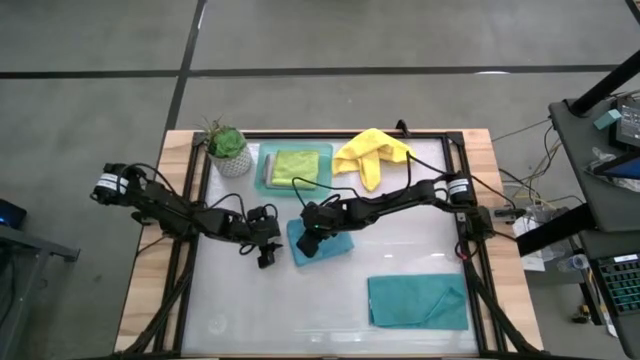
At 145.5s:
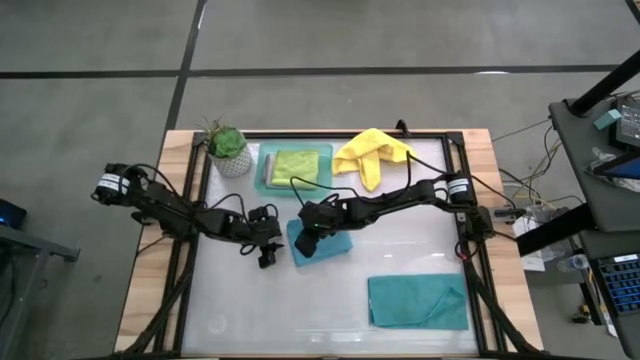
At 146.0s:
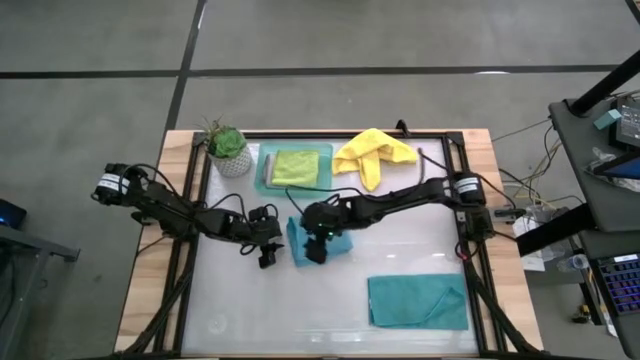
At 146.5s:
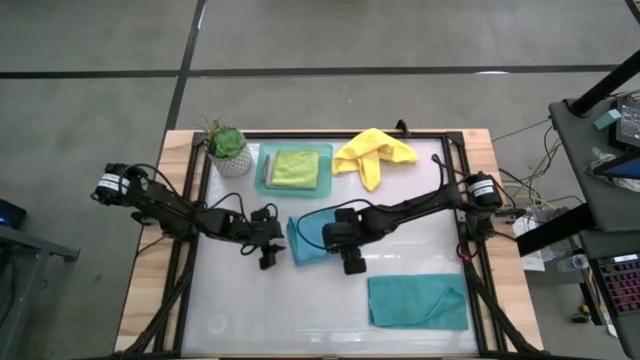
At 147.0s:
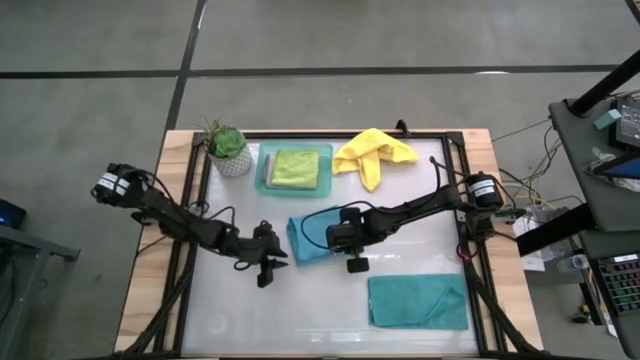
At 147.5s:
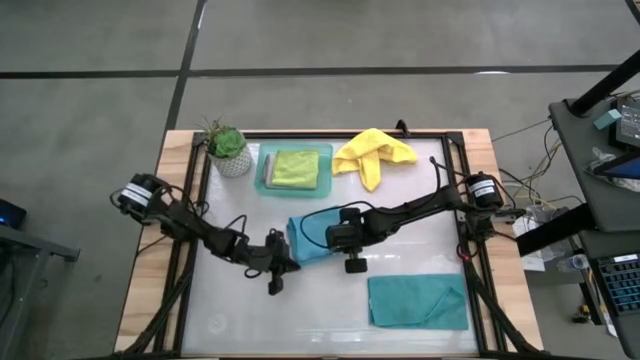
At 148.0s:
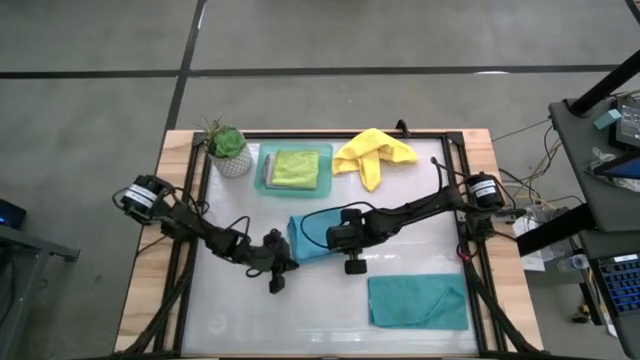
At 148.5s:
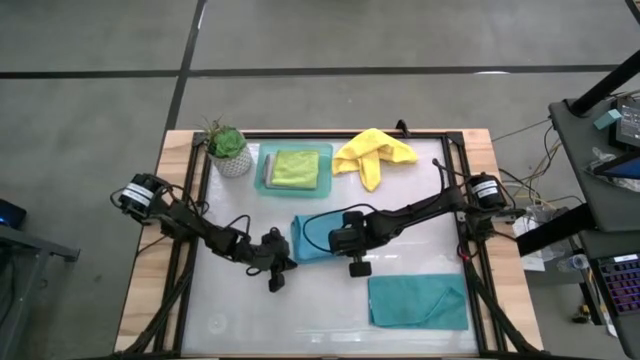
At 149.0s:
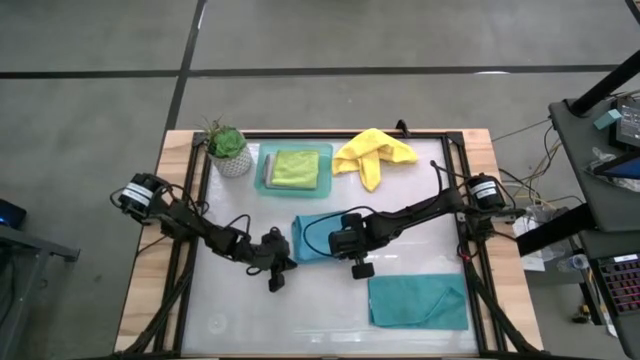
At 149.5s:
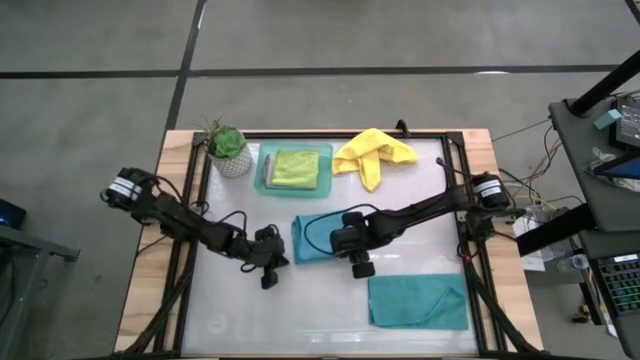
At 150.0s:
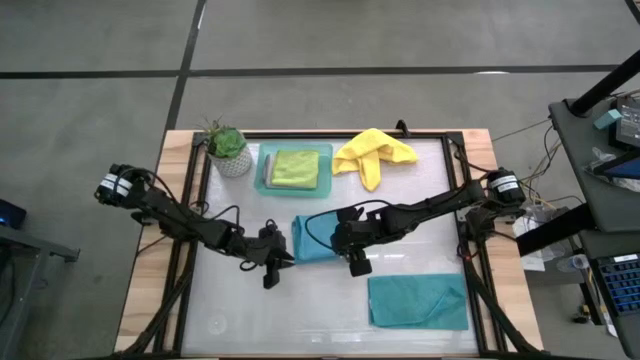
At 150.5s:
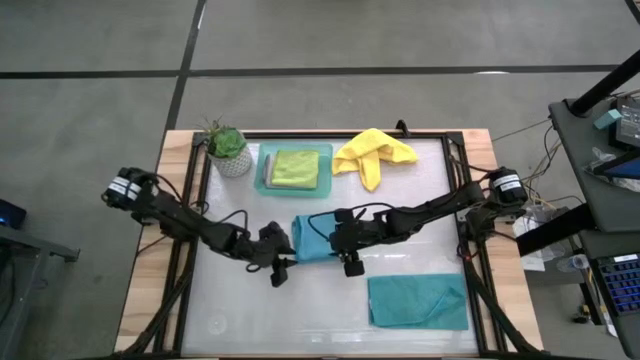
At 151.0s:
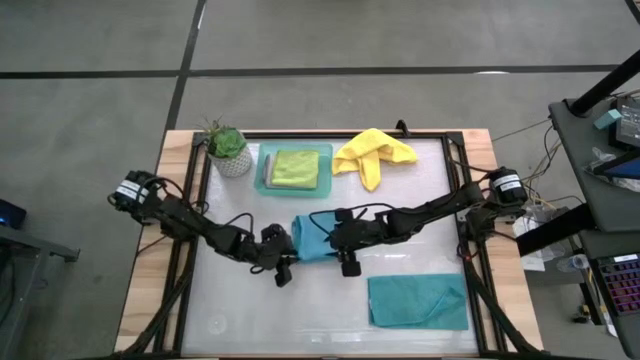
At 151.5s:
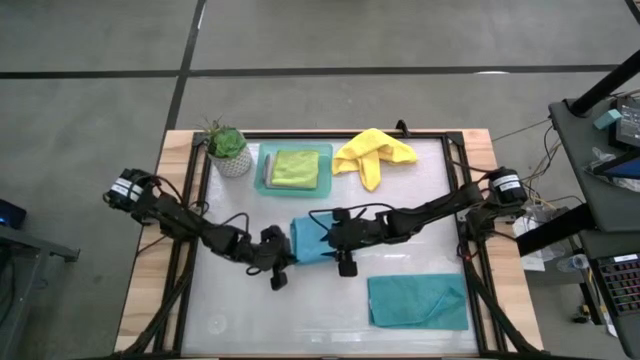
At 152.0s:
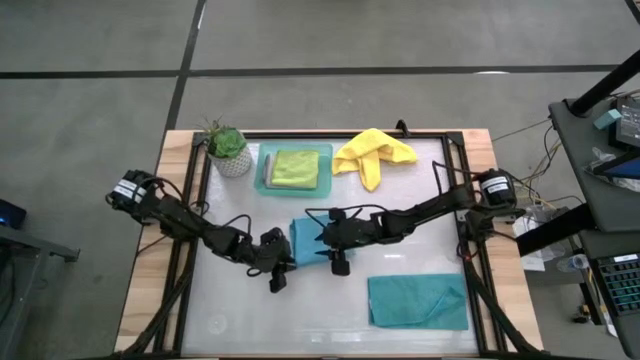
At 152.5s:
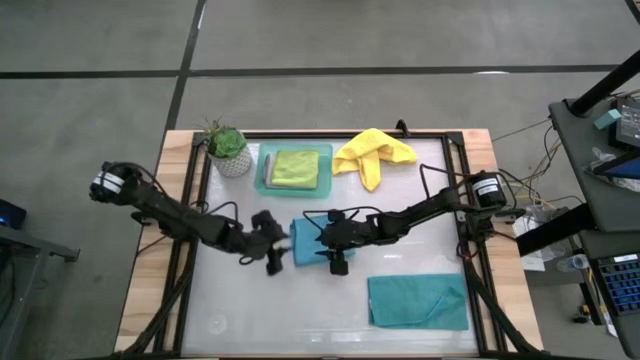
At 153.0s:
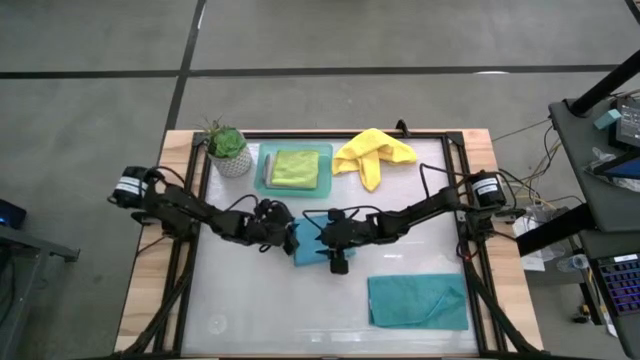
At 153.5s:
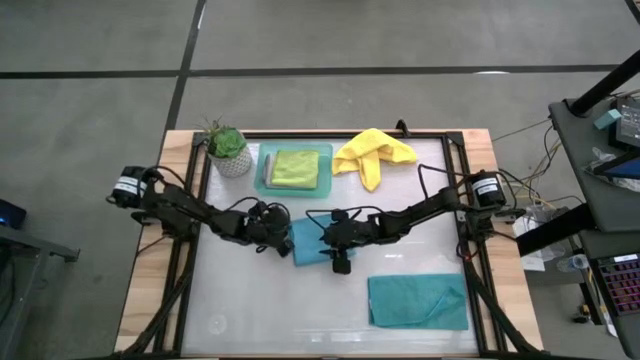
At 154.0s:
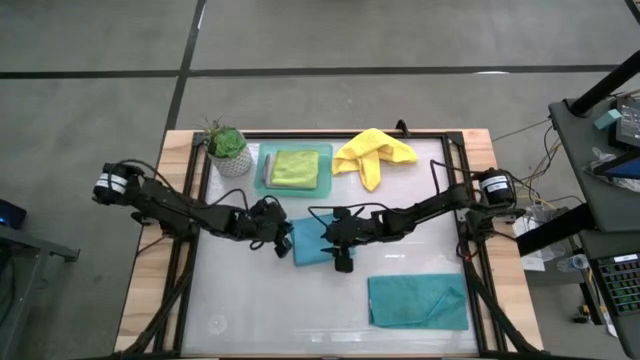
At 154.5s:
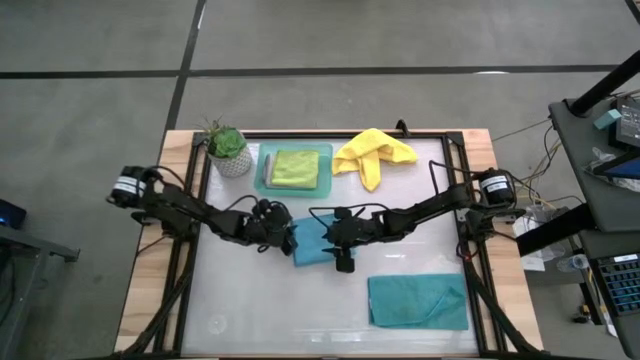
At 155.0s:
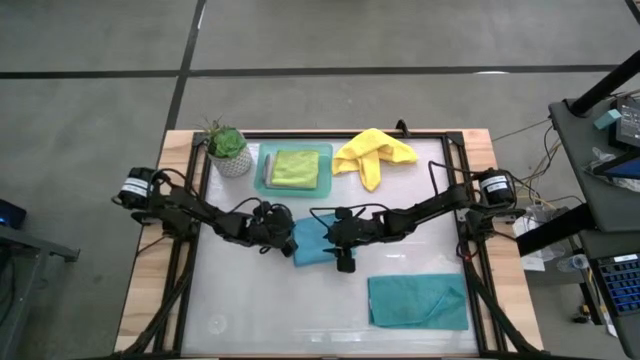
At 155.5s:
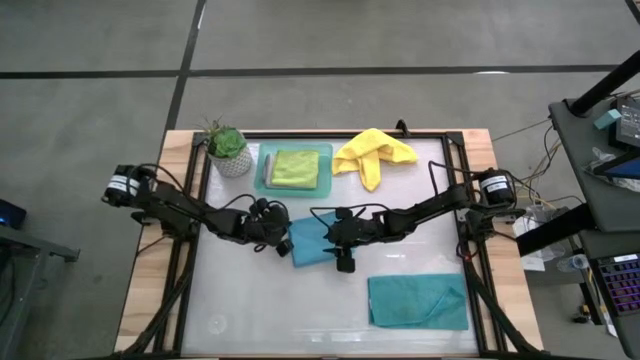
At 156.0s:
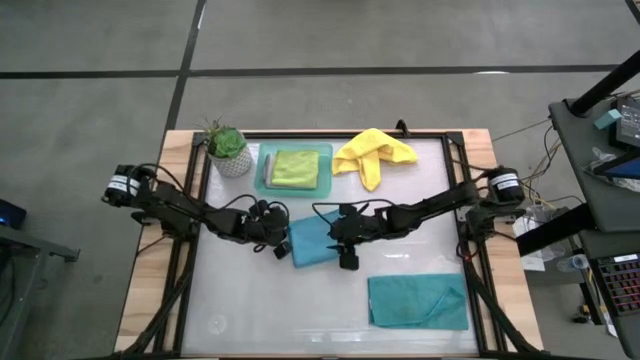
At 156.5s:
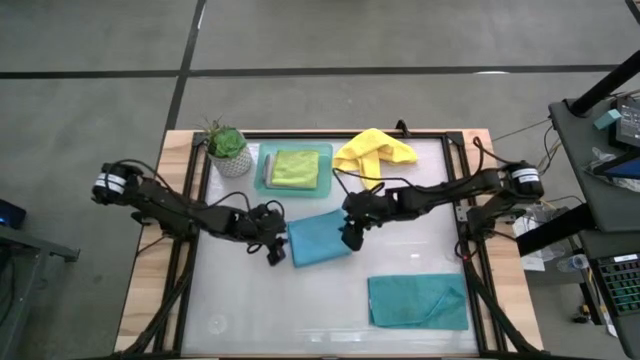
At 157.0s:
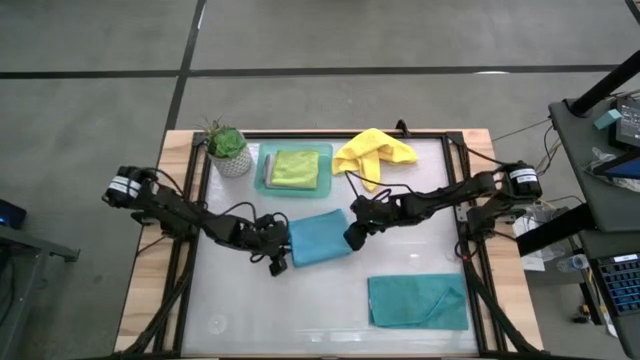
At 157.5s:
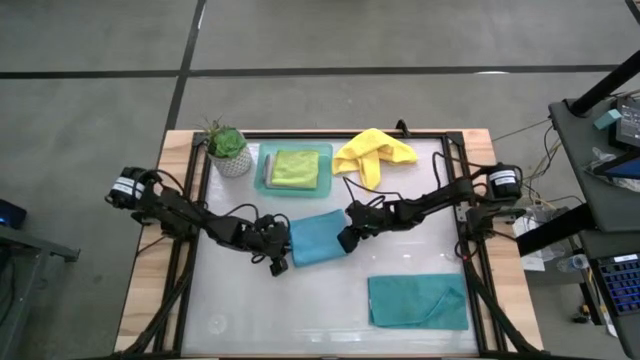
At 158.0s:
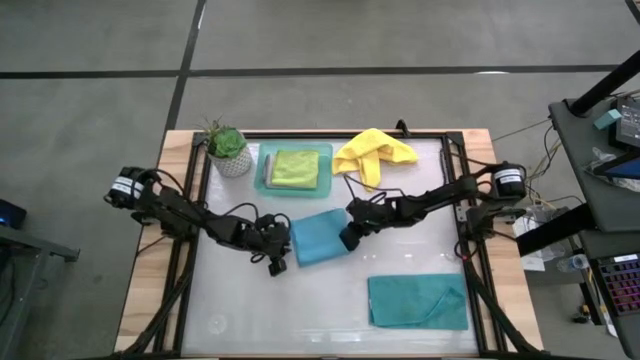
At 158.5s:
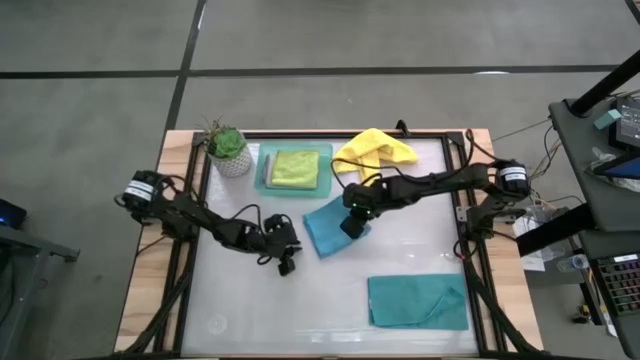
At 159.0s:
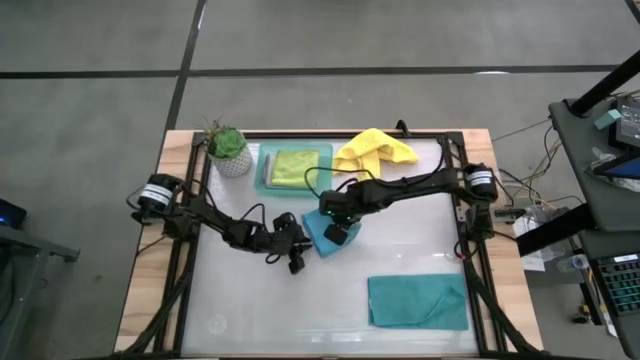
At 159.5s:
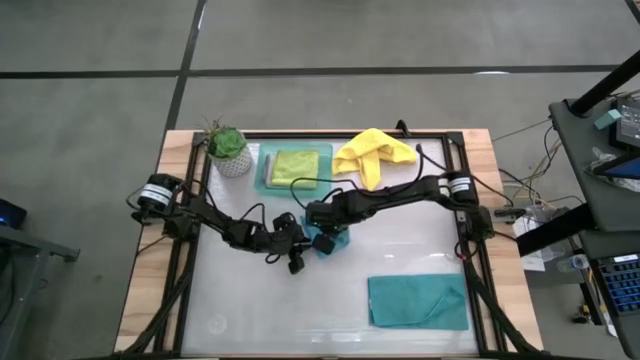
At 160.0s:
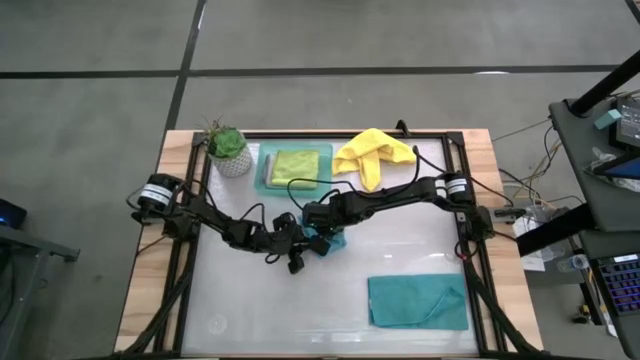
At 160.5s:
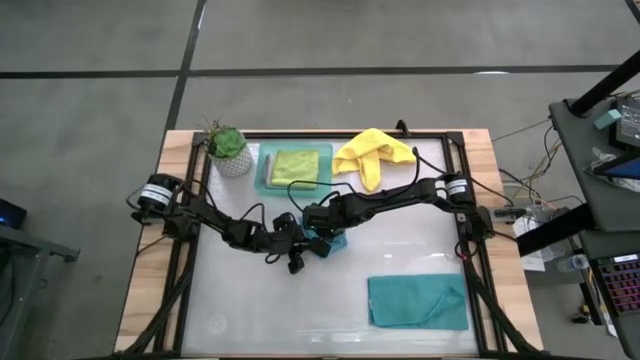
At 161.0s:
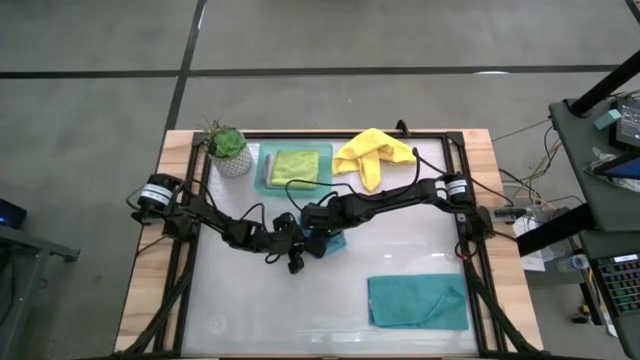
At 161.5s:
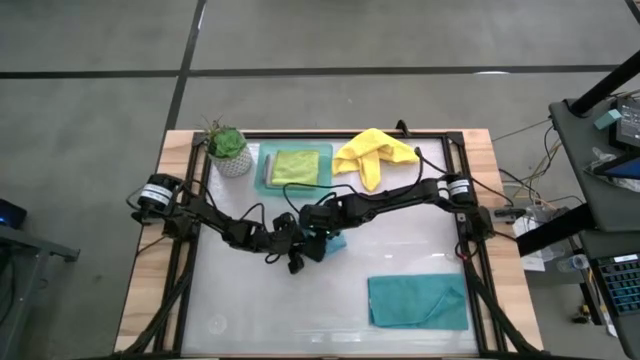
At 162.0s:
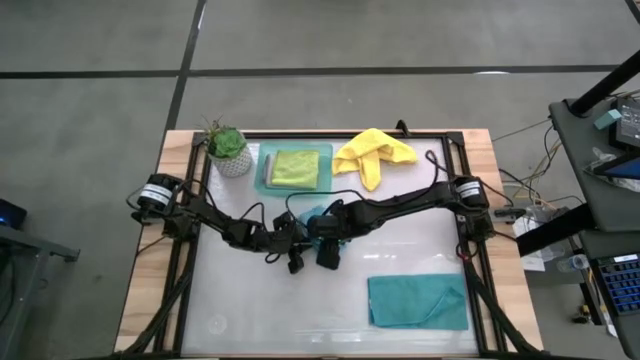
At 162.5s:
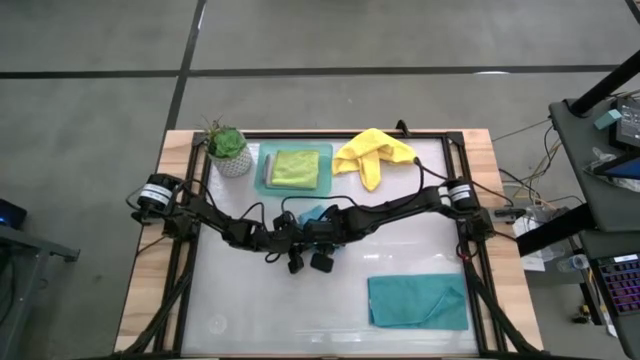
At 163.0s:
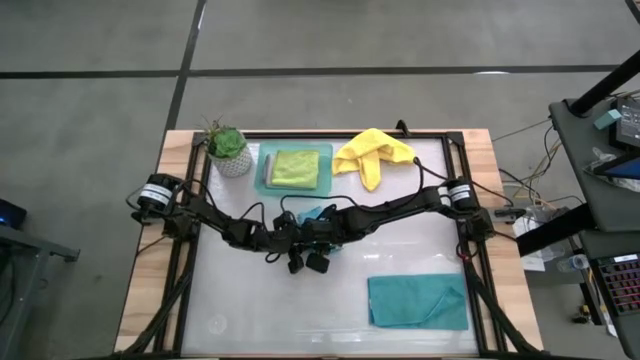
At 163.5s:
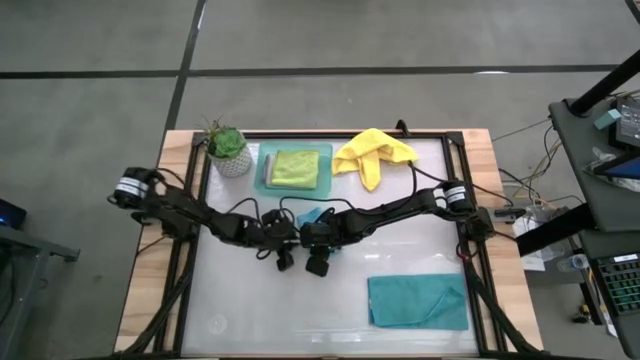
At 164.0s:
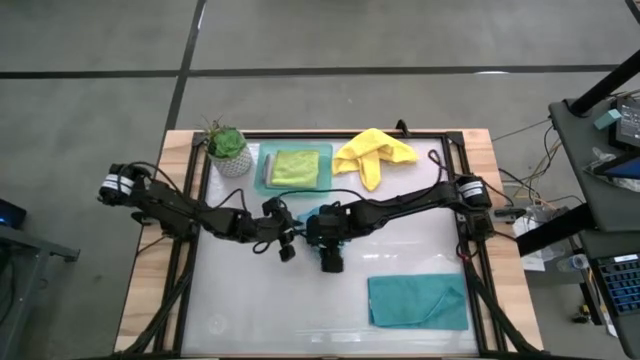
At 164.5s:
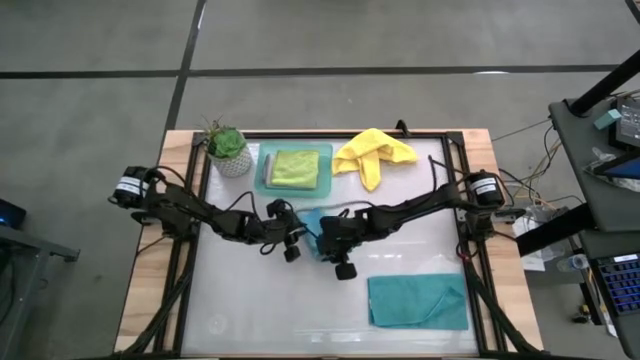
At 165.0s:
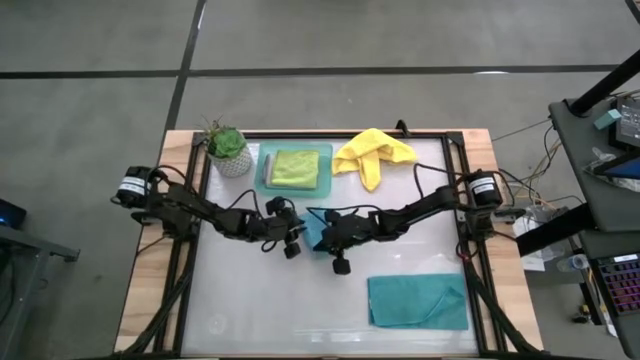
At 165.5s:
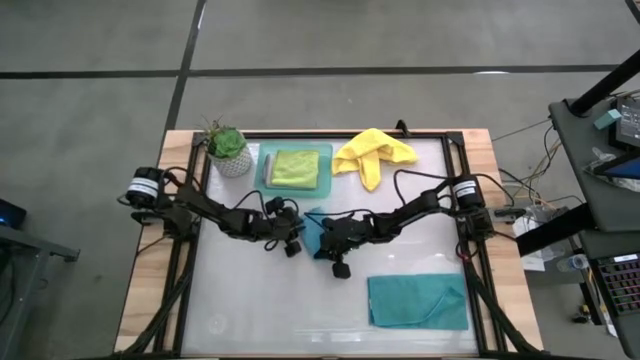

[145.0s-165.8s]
Task: Fold microfiber towels
Fold the top blue microfiber towel

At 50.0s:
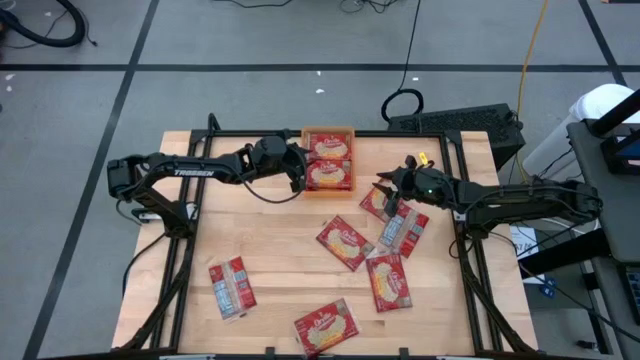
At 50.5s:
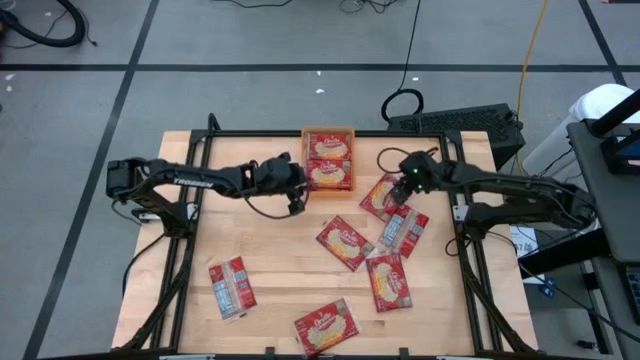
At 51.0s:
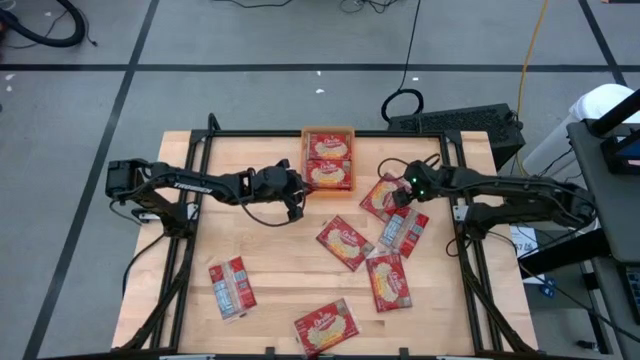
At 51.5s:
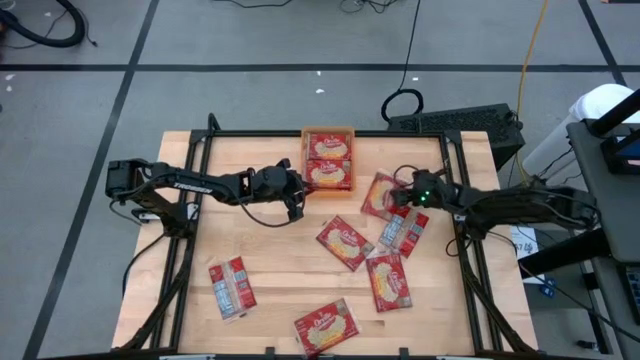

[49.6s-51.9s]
Task: Sort popcorn bags into baskets
Put the red popcorn bag into the orange bin

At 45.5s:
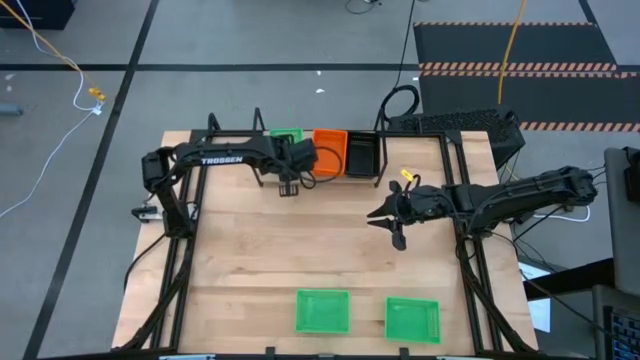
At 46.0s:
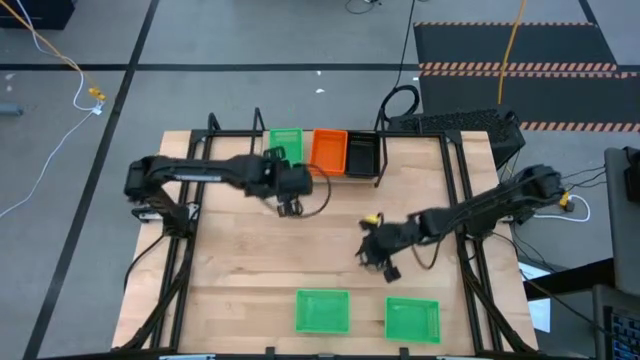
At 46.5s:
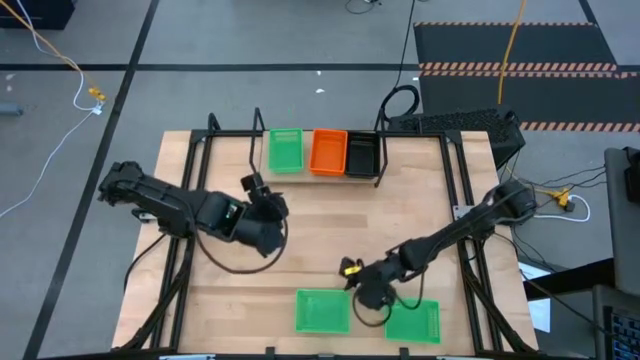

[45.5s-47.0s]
Task: Stack baskets on shelf by color
Stack the left green bin on top of the green bin on the shelf
